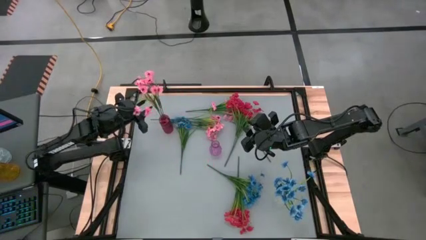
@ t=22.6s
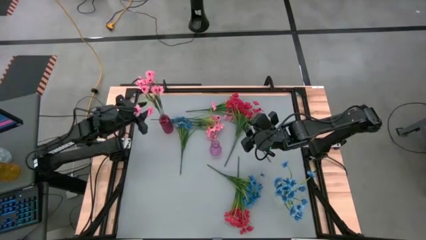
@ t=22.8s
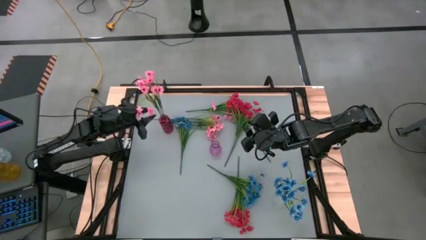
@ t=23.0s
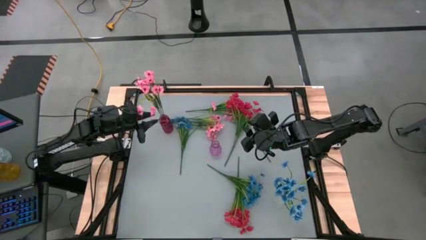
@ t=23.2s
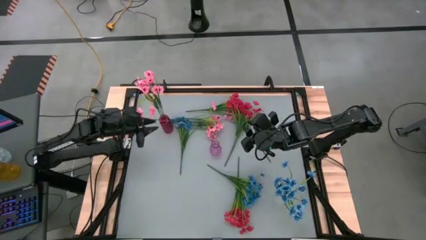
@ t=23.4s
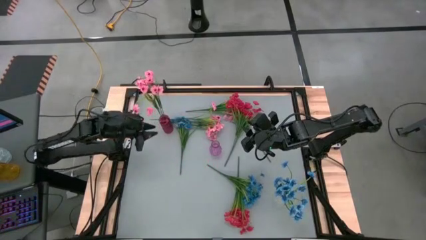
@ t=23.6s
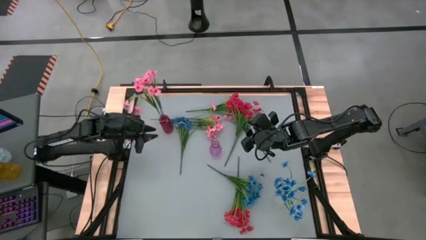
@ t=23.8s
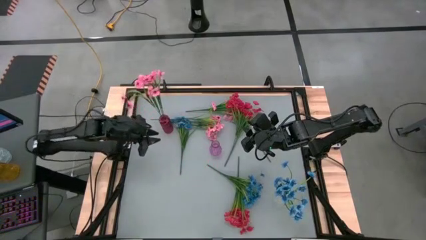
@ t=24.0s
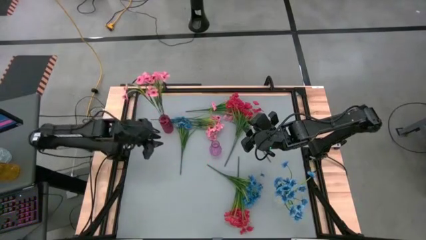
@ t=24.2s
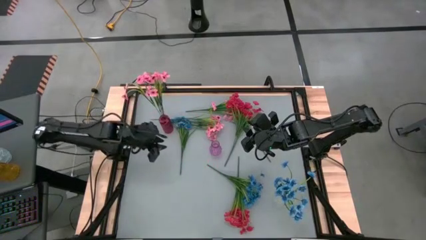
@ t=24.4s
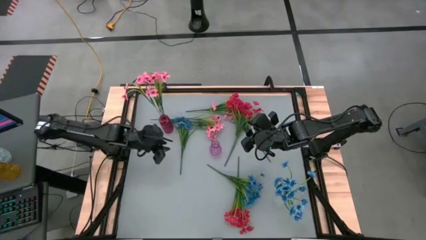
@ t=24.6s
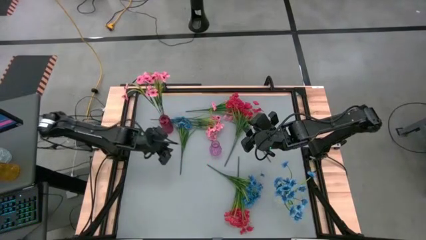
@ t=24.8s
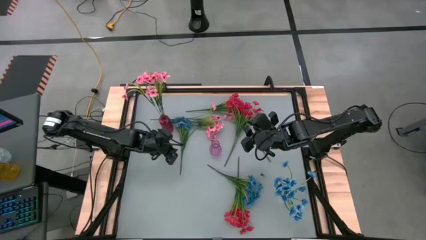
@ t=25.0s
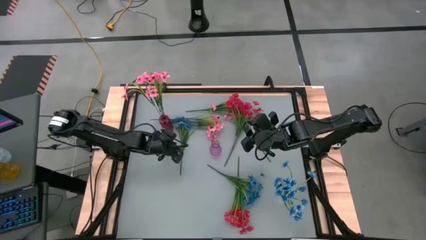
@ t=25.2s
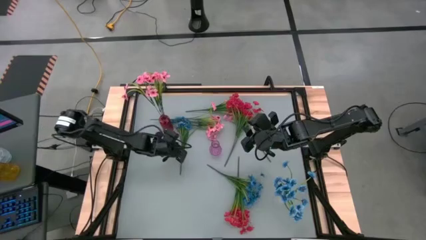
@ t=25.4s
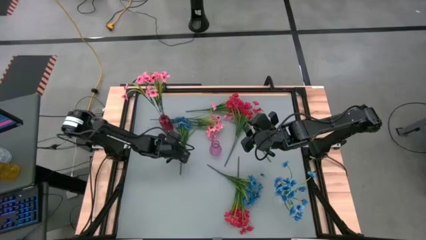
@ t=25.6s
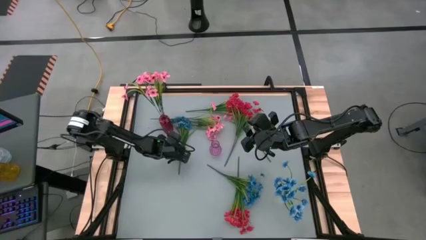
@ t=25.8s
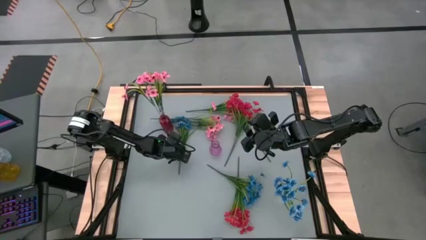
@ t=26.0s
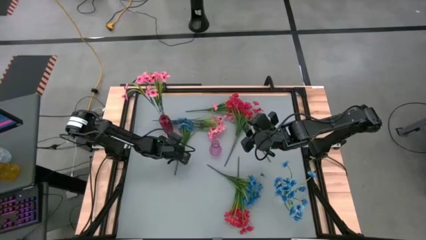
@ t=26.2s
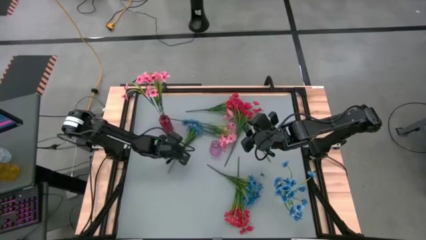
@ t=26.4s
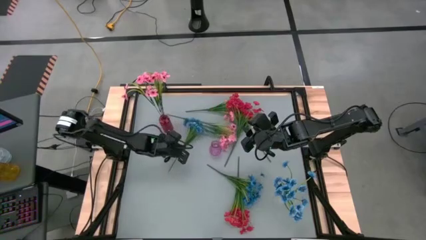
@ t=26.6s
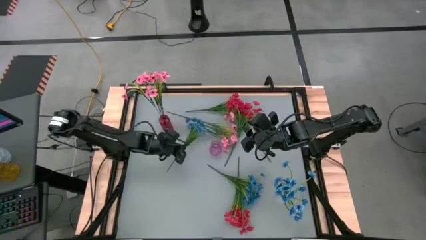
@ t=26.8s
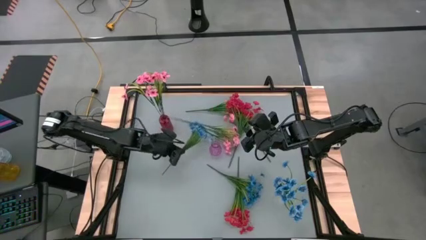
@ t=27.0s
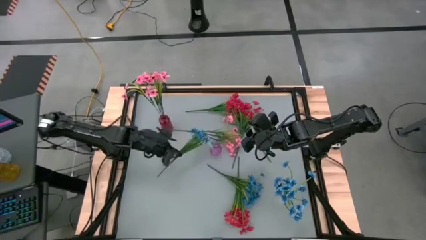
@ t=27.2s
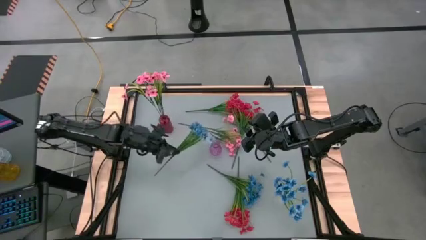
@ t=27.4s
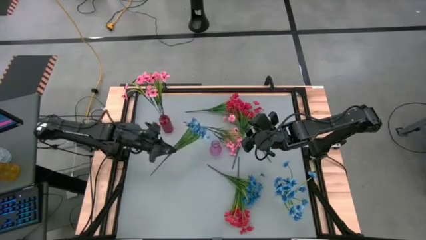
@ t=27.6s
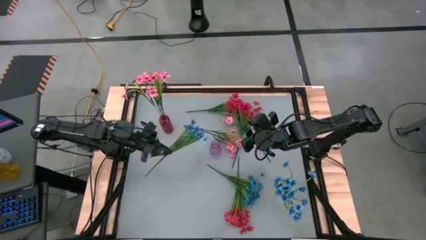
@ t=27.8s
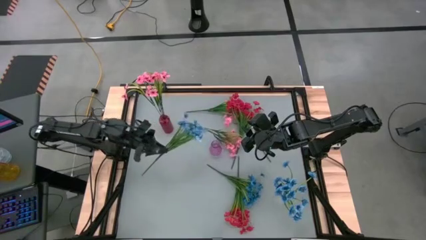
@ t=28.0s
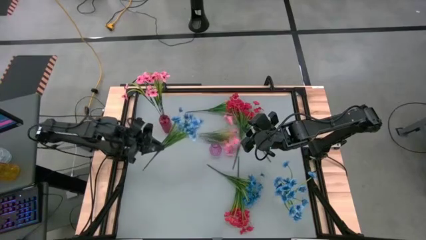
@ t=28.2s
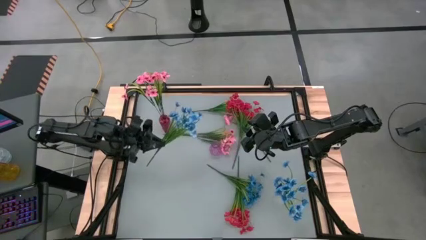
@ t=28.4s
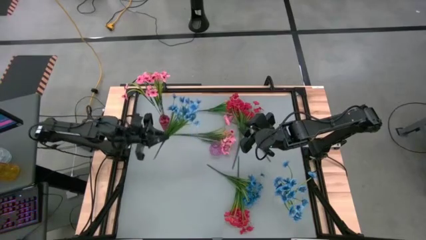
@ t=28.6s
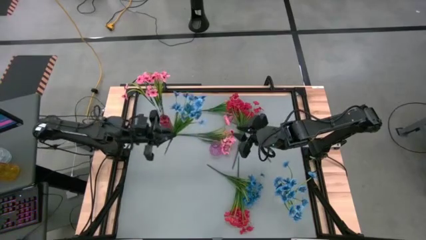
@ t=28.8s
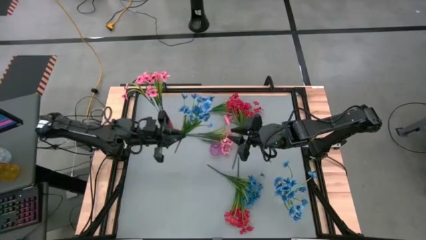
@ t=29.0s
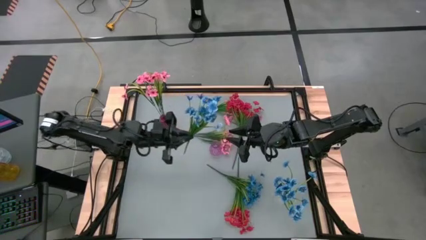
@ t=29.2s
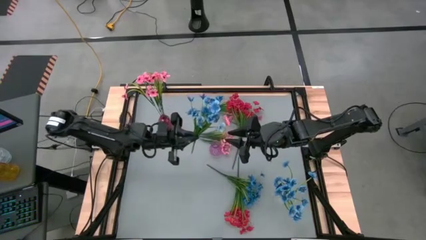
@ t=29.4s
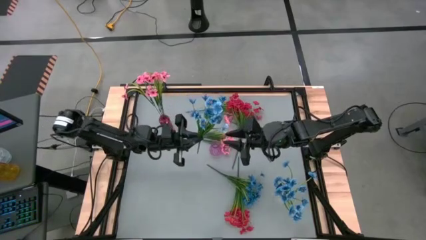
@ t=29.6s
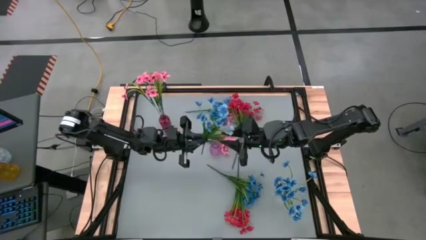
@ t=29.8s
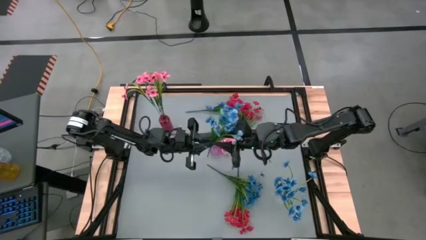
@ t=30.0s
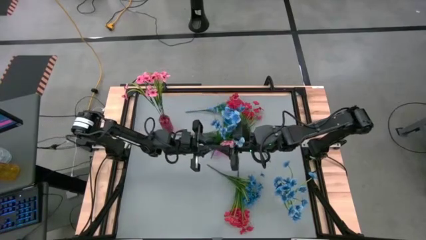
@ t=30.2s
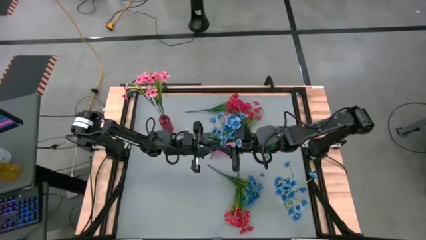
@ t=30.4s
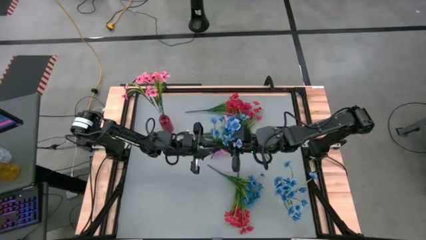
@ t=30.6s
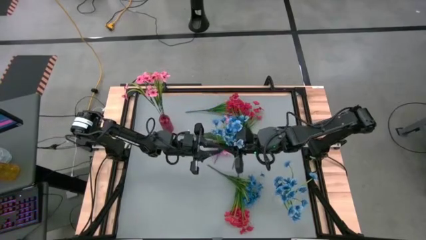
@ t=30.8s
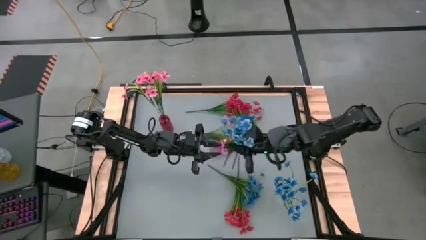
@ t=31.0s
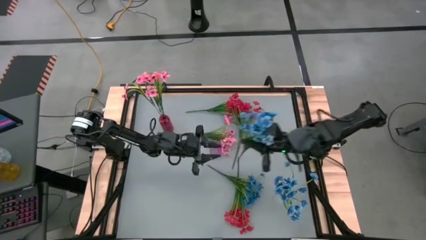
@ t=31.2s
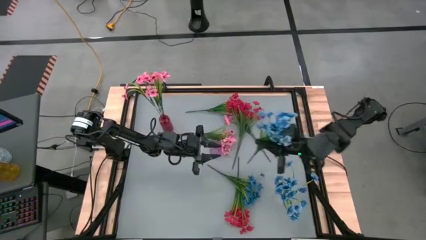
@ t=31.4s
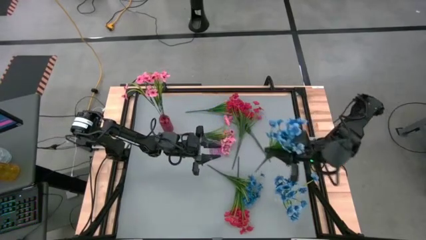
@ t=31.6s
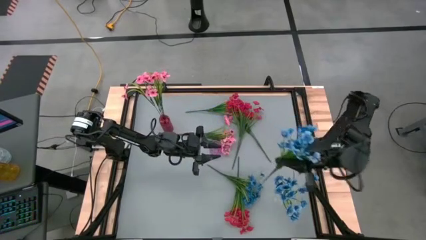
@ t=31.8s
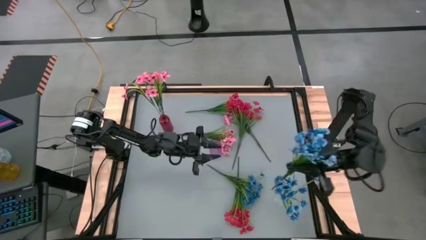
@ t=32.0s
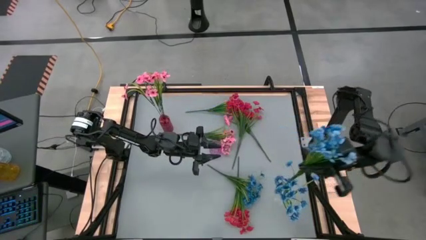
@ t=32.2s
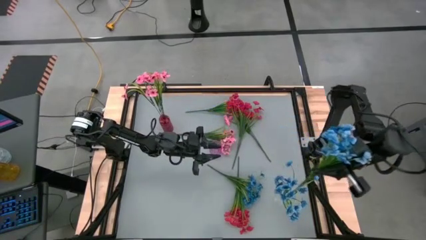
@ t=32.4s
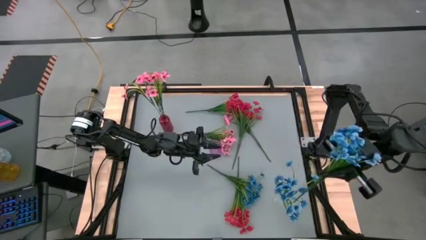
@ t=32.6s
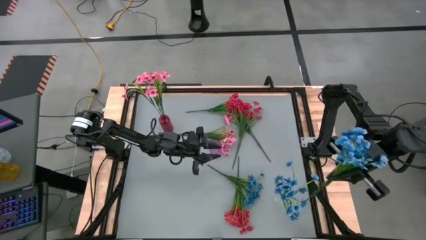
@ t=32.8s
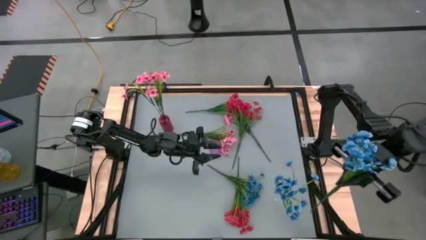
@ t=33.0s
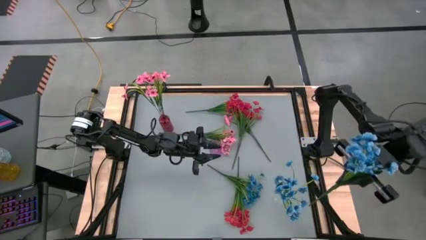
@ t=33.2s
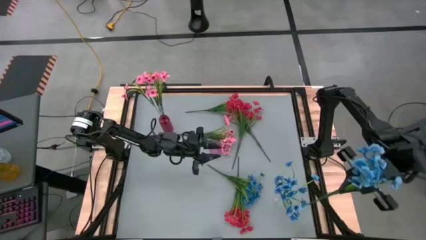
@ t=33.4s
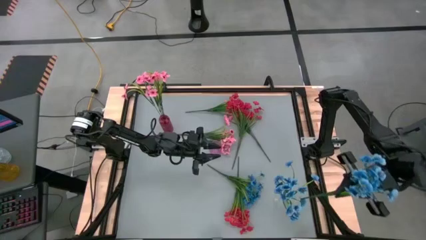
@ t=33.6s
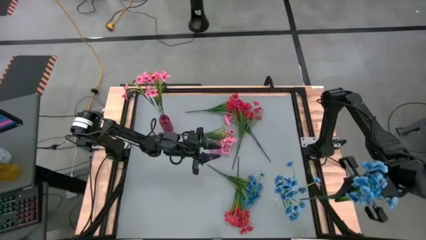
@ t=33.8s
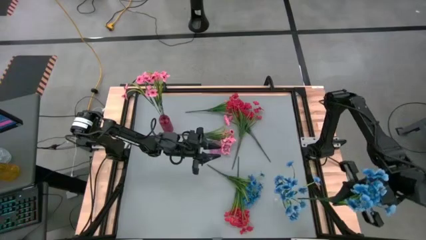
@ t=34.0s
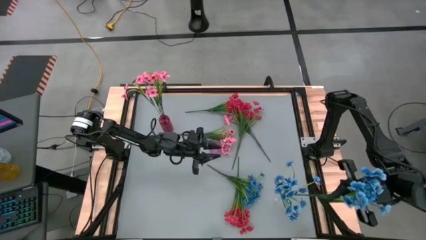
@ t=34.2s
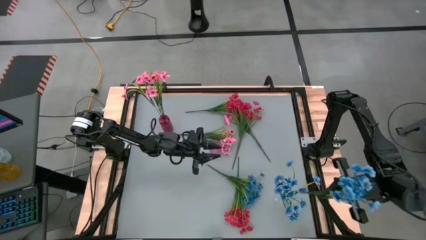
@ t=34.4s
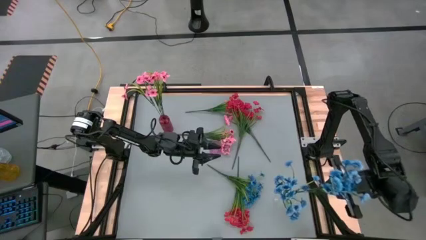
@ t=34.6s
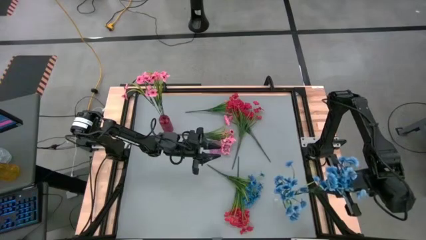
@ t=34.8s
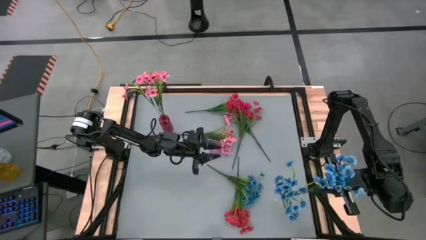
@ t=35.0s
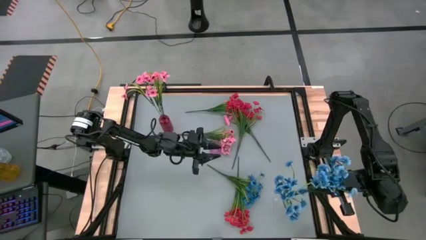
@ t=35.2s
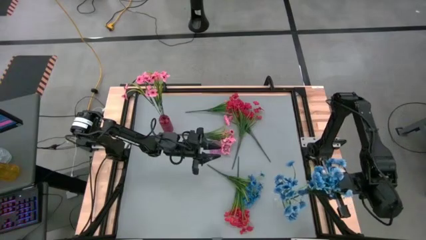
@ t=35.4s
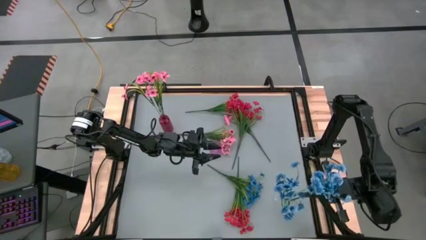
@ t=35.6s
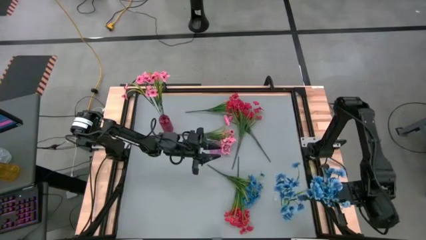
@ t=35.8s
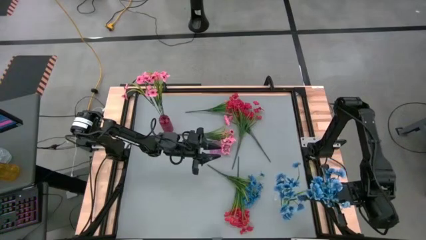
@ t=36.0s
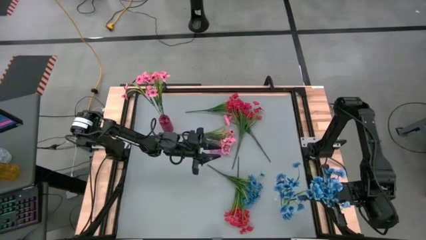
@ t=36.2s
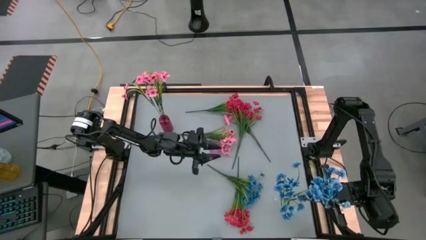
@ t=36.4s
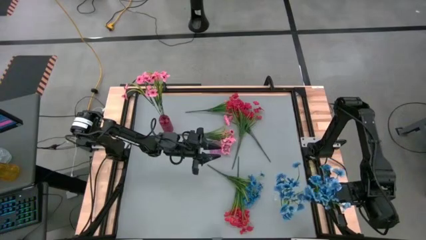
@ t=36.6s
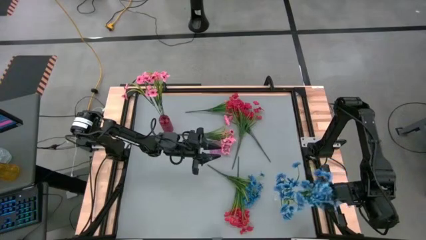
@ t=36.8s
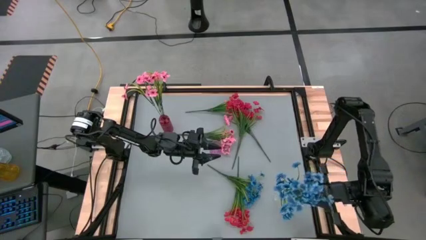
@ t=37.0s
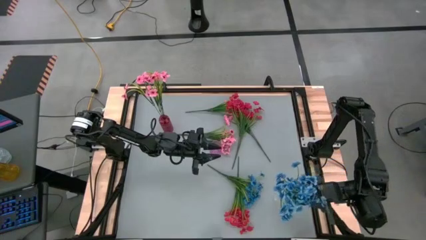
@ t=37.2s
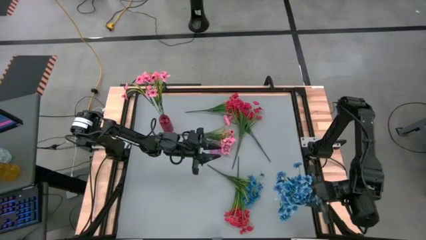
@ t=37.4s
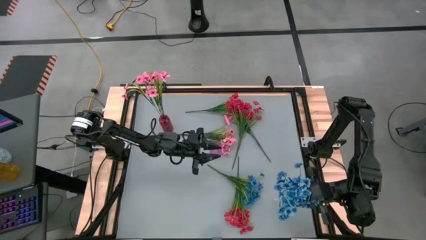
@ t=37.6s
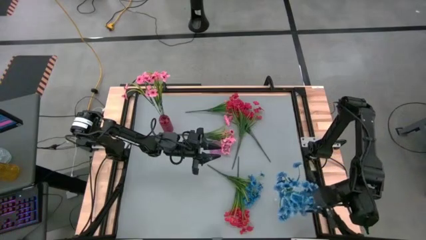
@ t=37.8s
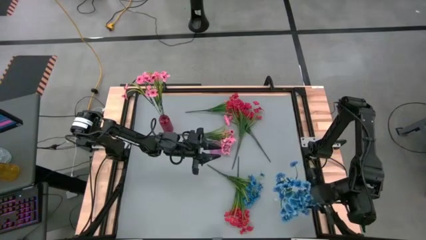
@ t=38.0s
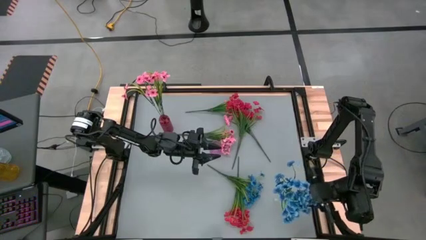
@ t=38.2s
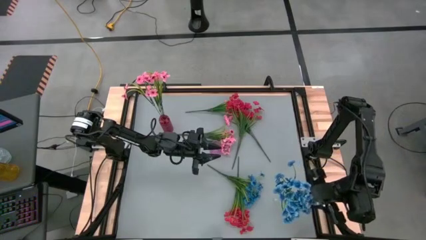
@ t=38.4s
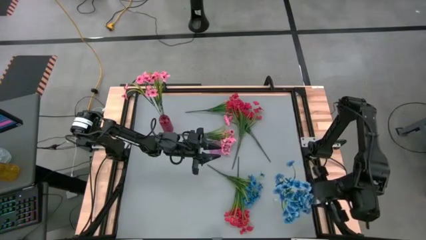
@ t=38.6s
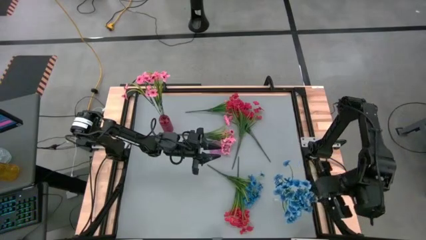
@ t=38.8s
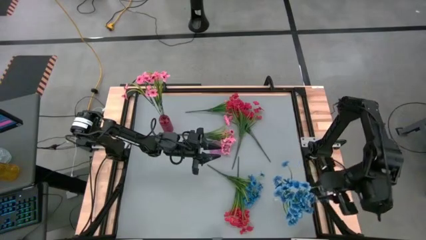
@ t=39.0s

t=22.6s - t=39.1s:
Task: Sort flowers into vase by color
Put the left blue flowers into the transparent vase
